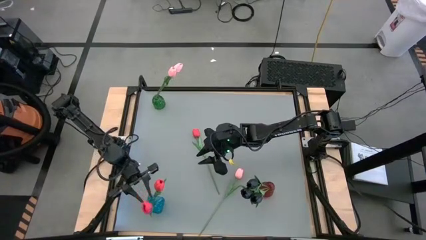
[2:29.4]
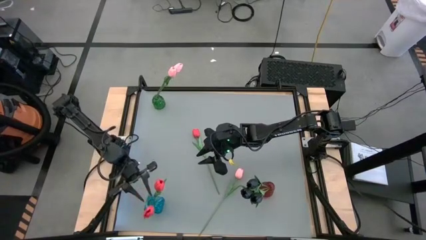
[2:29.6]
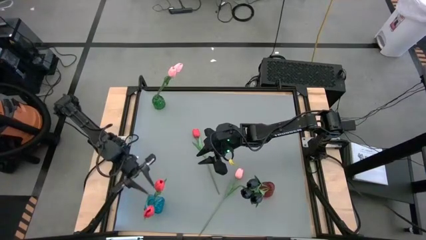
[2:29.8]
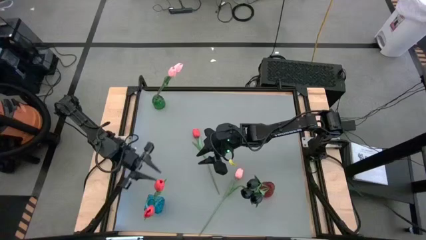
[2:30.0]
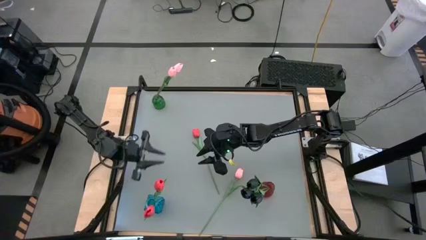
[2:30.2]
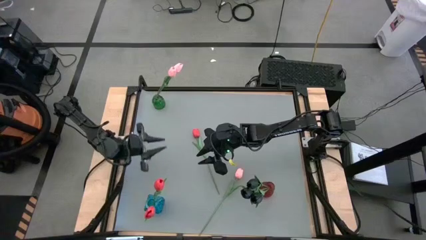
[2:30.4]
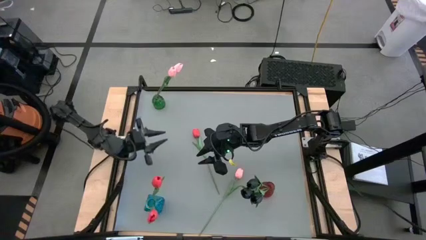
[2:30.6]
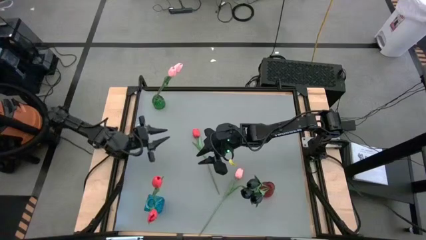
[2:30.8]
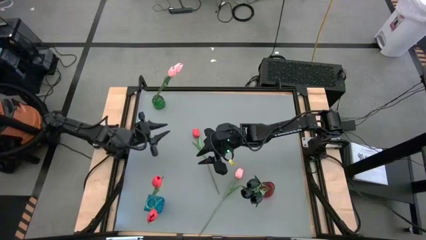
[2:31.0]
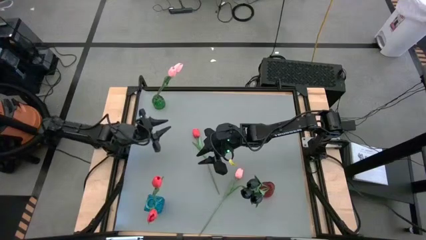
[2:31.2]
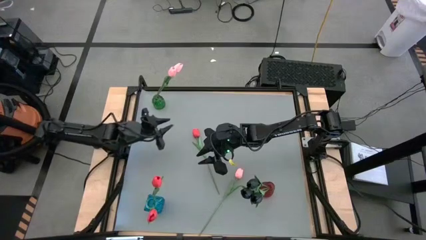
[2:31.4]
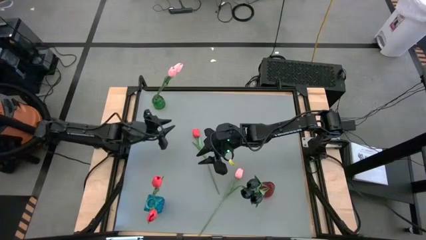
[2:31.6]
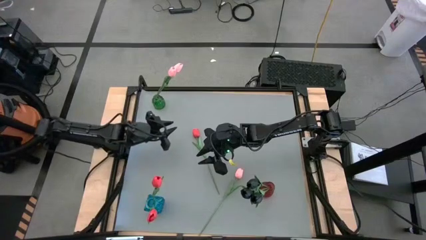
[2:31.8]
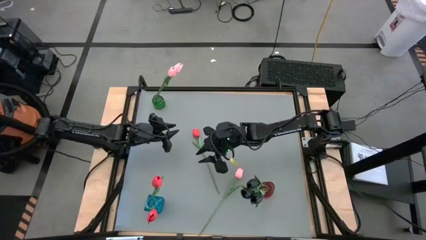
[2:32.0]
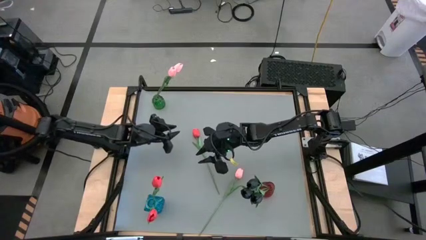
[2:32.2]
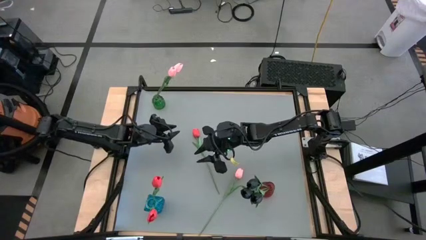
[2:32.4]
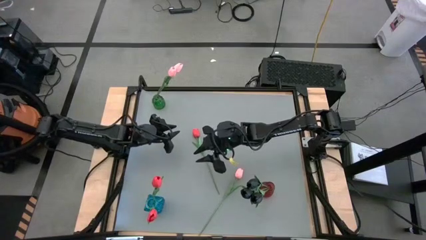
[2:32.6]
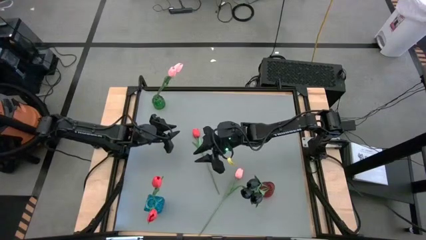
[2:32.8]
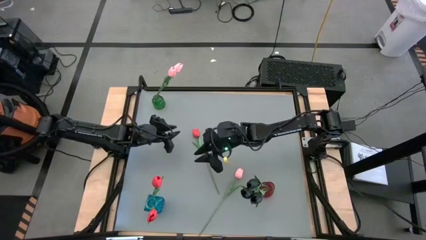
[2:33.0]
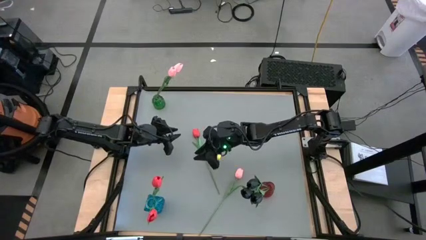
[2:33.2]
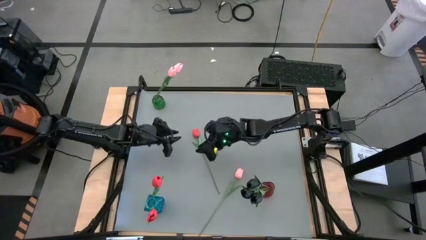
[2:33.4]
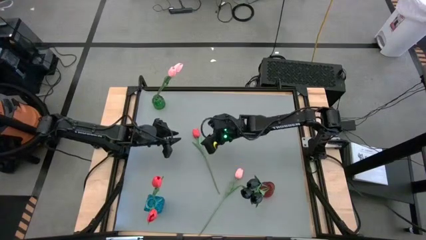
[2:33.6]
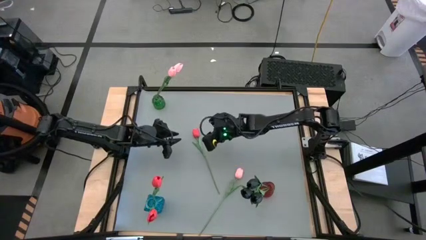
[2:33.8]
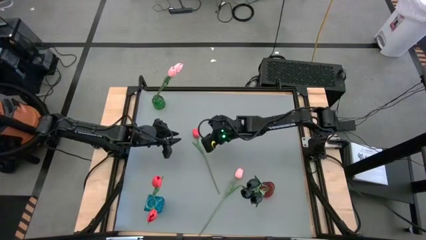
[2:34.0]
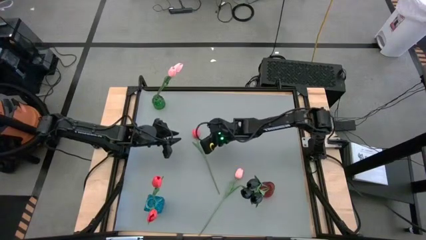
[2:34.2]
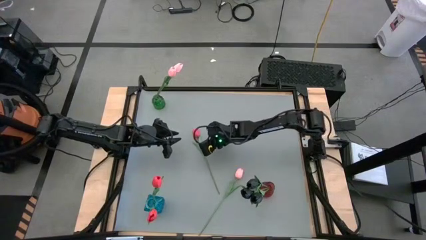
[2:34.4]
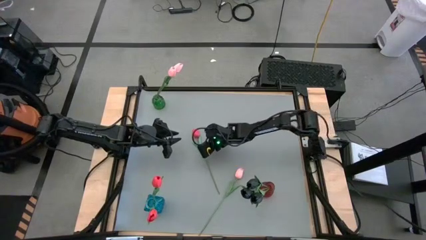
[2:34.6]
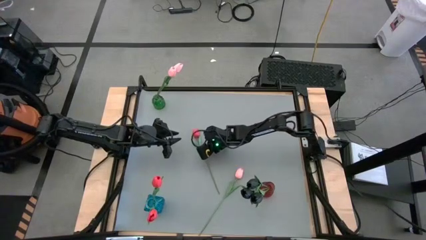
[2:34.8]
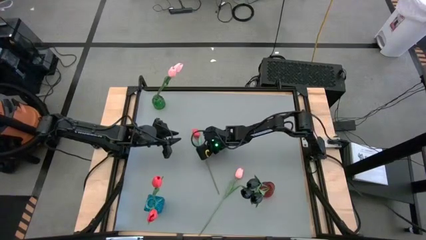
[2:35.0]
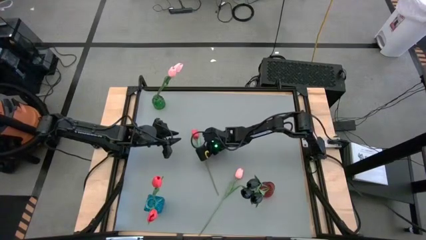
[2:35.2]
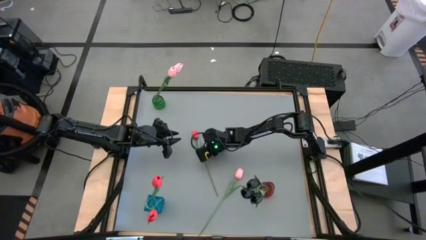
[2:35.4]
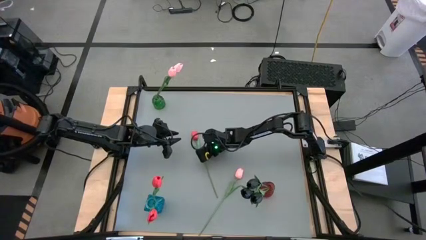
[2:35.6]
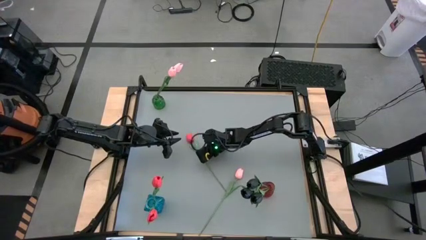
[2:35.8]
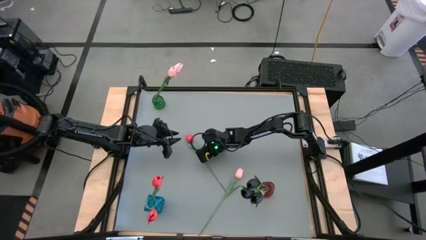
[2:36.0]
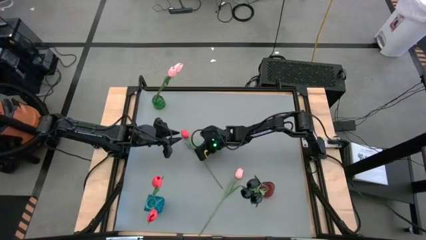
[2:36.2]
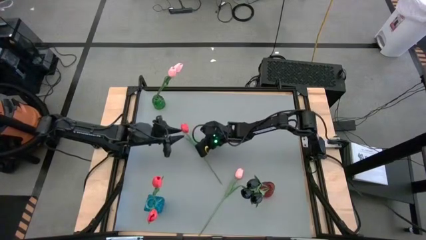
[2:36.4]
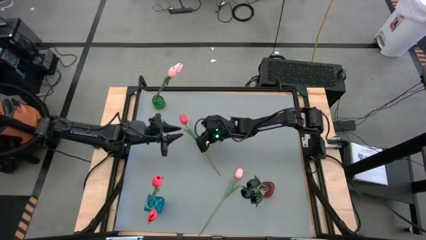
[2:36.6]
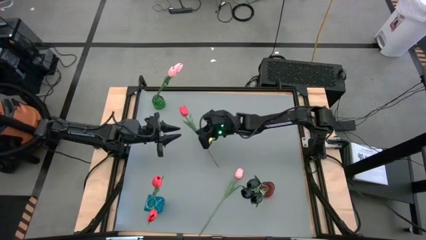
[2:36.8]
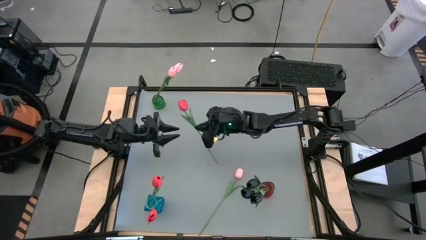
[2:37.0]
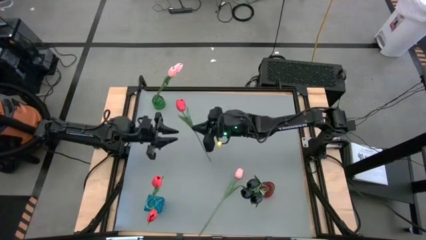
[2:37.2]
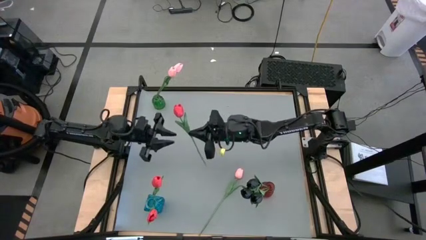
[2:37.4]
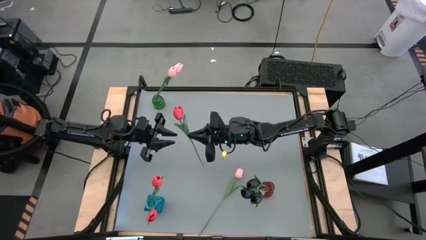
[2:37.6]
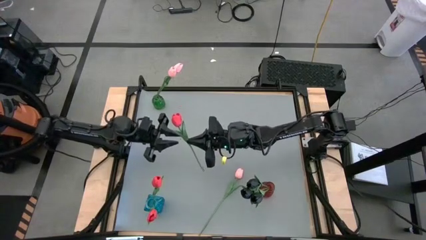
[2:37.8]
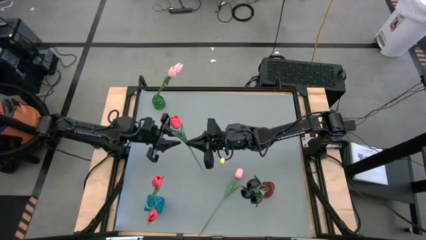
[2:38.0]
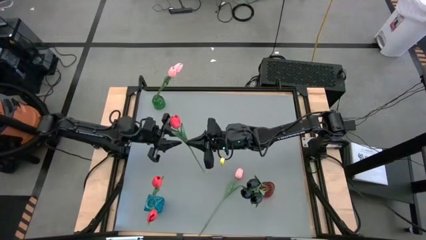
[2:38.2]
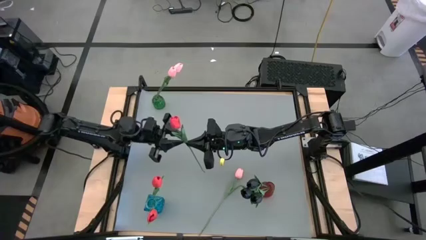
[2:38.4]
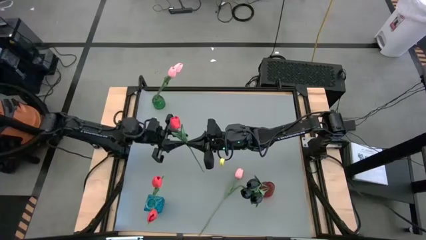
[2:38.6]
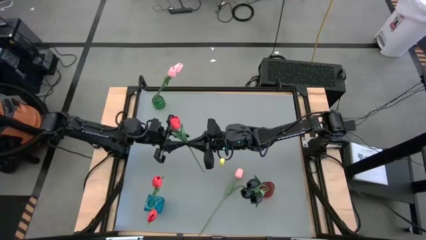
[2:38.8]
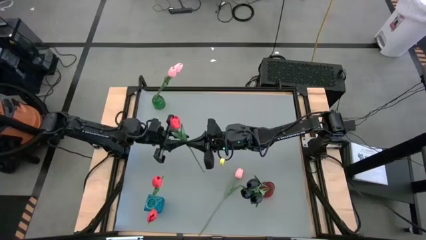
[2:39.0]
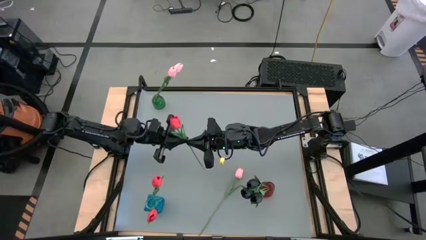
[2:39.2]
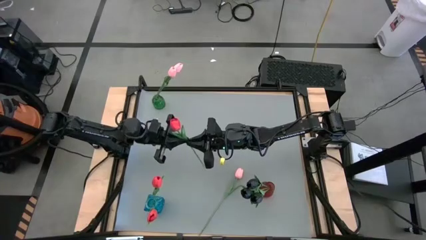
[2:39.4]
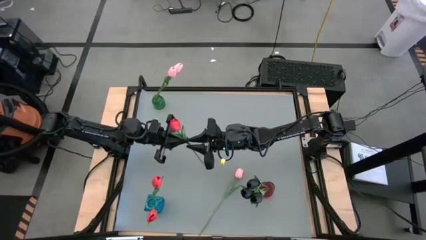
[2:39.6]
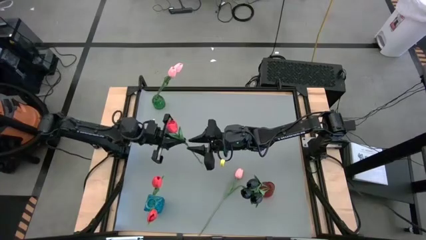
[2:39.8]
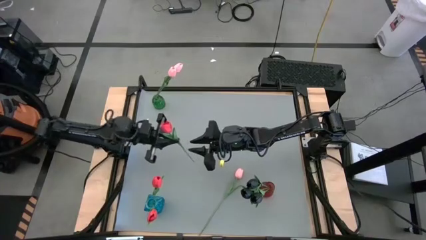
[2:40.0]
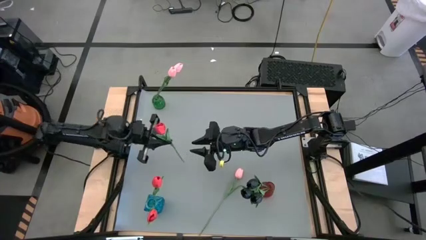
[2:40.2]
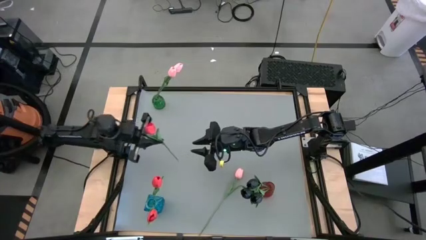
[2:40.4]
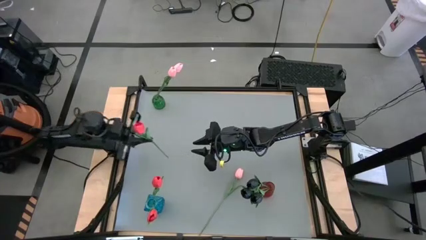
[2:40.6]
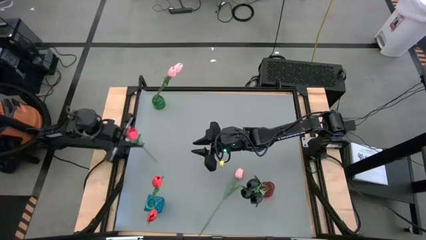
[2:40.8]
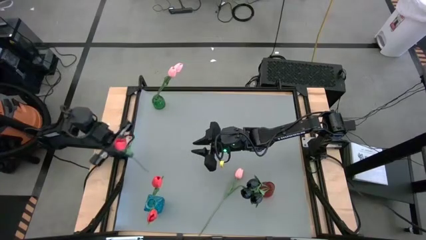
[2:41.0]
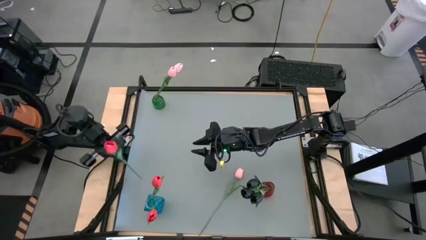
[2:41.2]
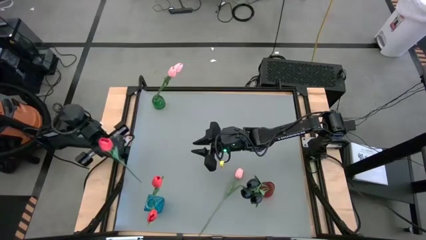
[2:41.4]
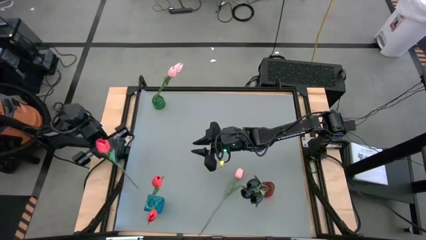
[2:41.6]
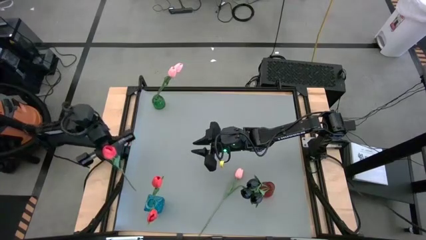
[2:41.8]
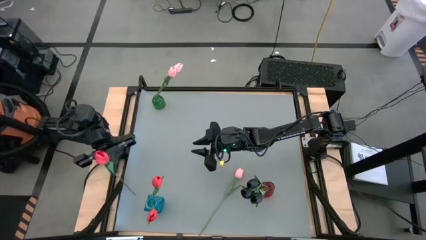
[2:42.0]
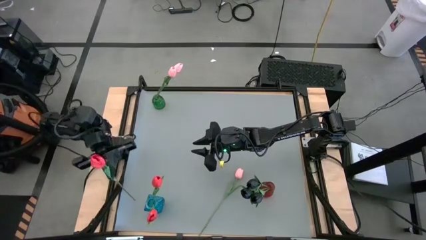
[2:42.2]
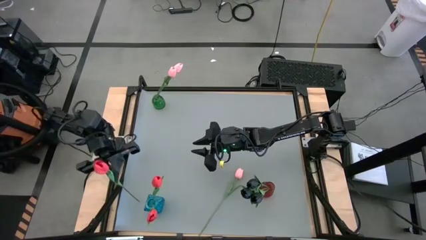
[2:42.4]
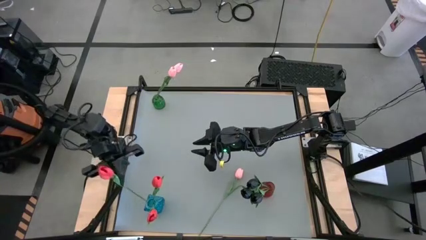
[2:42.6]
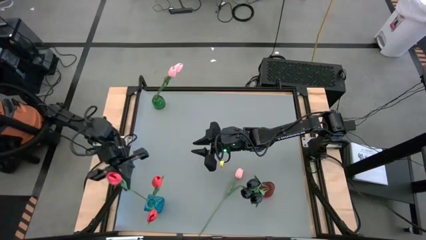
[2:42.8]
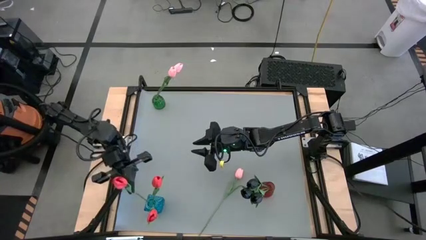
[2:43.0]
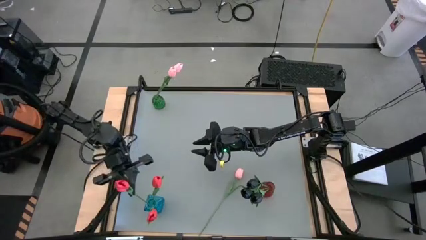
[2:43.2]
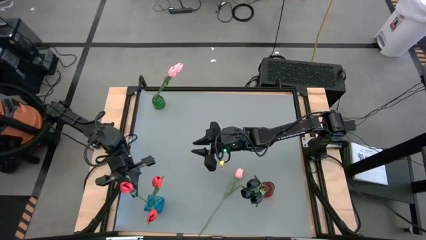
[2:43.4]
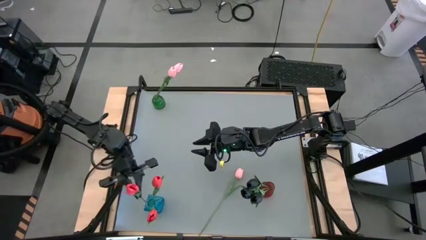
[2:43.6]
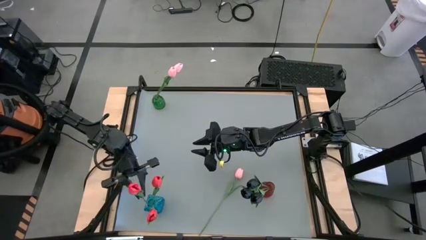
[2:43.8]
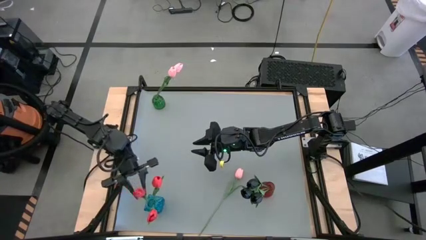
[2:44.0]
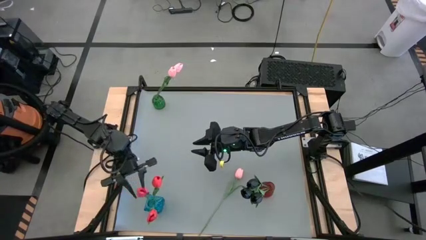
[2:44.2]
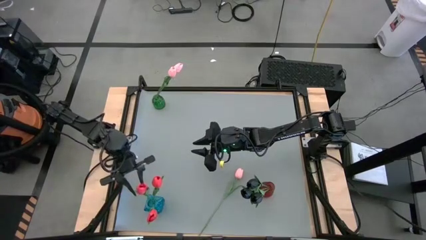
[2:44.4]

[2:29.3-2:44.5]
Task: Sort flowers into vase by color
Put the red flower into the blue vase
